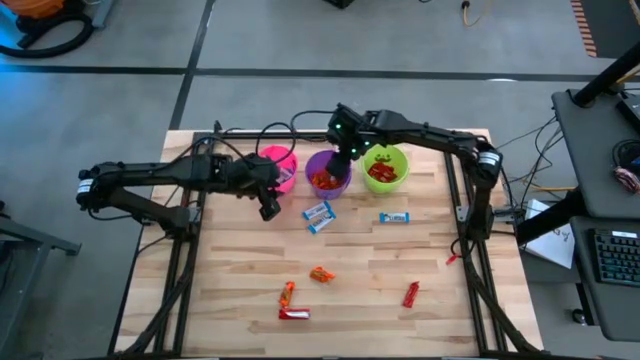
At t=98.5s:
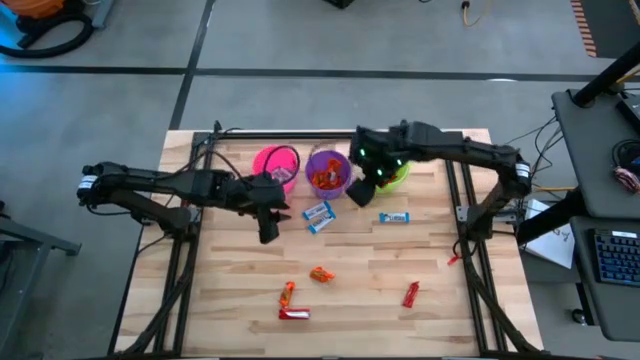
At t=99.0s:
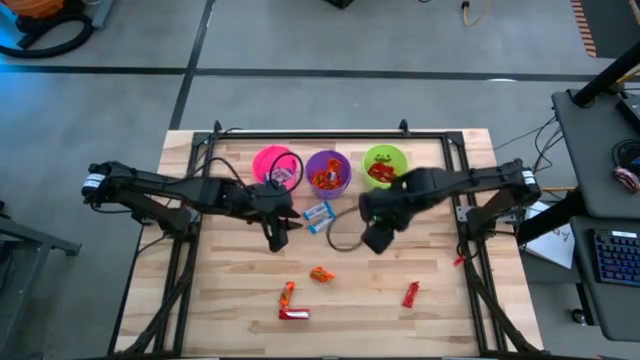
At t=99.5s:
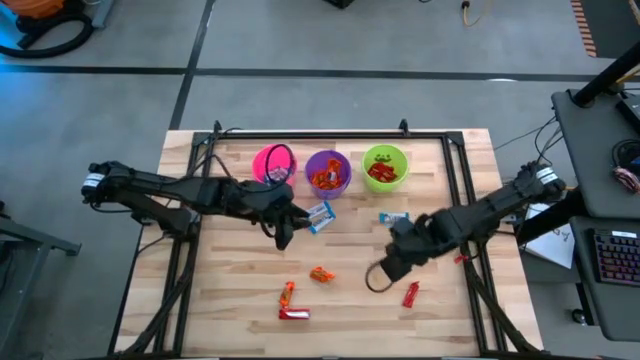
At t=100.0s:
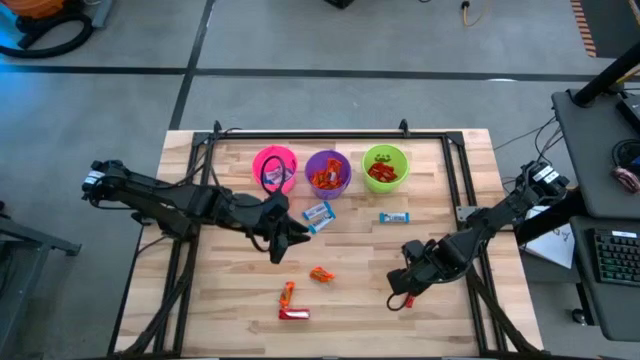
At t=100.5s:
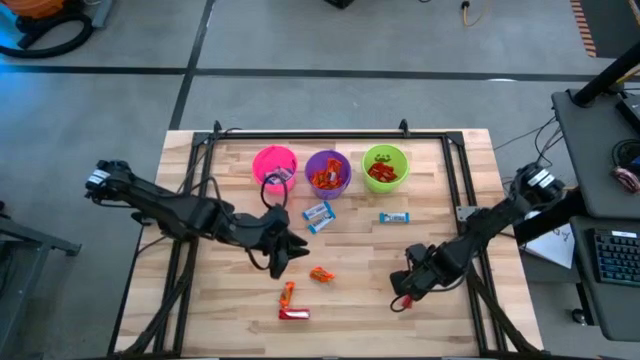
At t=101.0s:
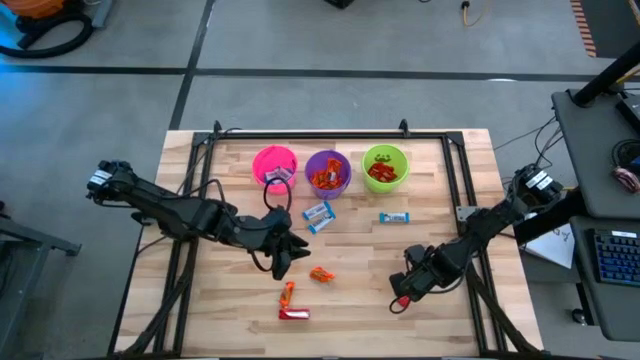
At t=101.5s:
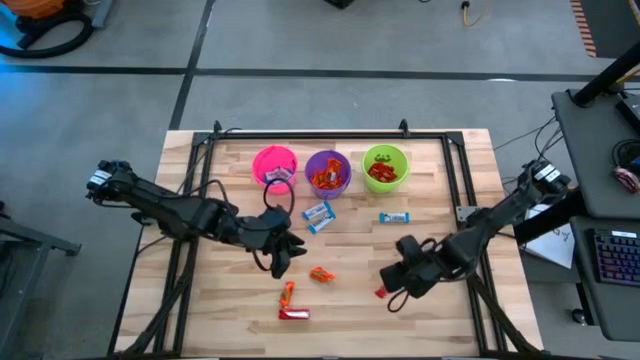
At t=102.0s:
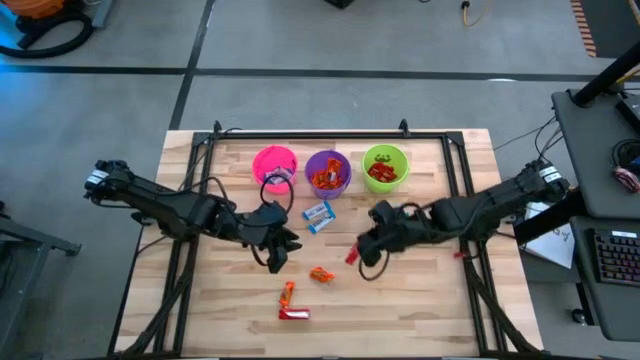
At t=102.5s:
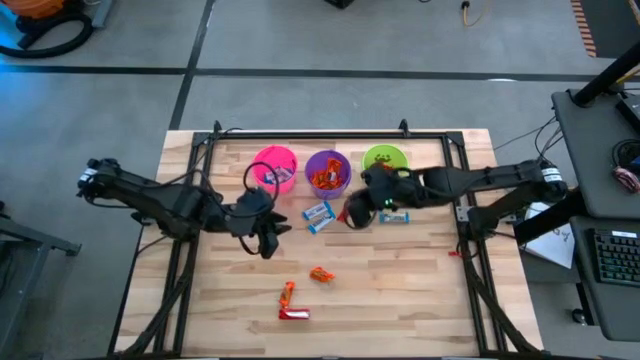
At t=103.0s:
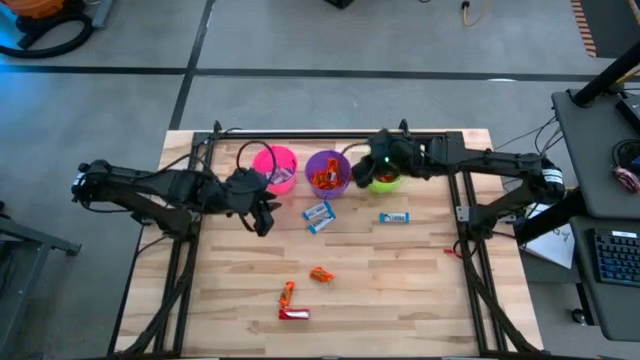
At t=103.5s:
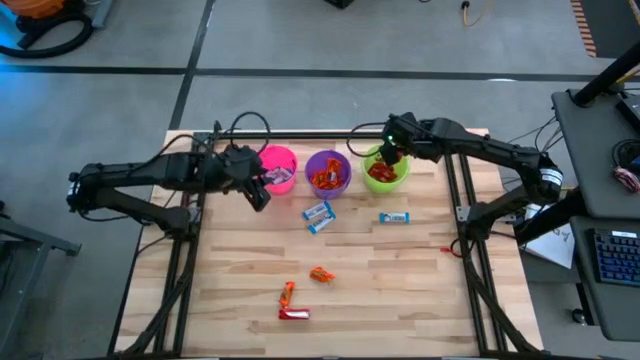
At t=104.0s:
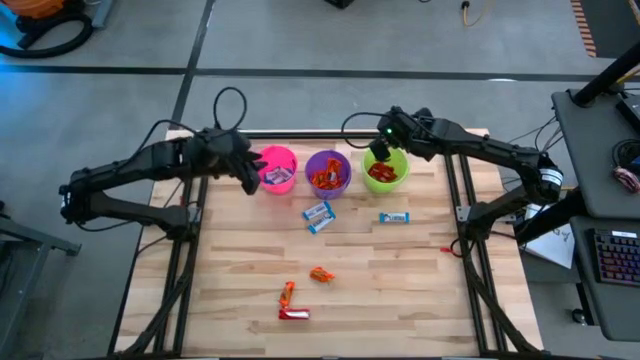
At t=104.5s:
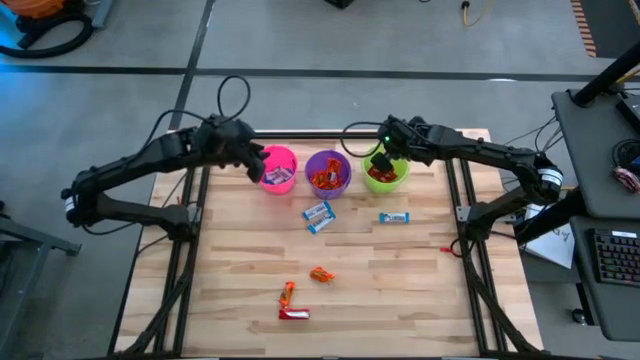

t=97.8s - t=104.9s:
Task: Organize candy in baskets
Put the red chocolate into the green bucket

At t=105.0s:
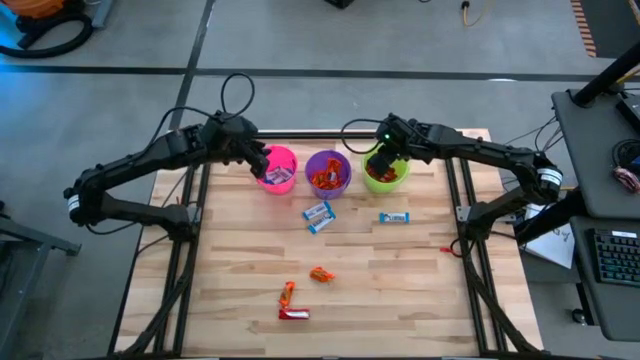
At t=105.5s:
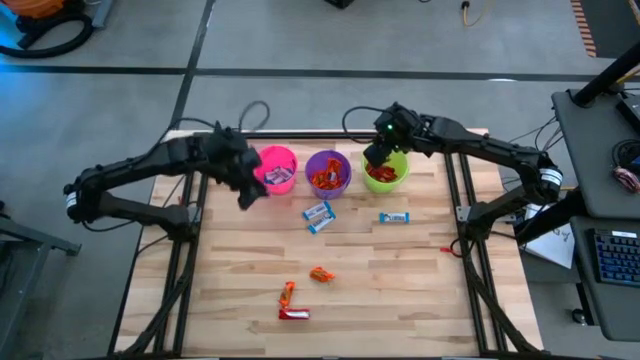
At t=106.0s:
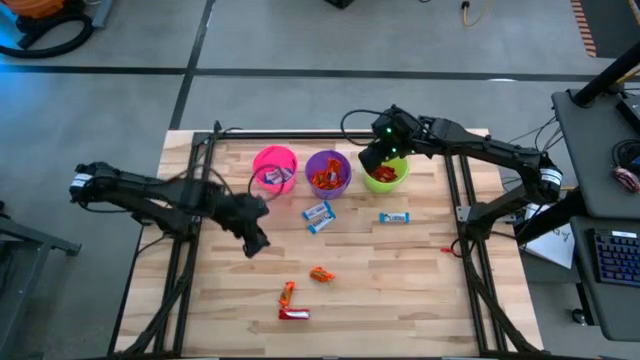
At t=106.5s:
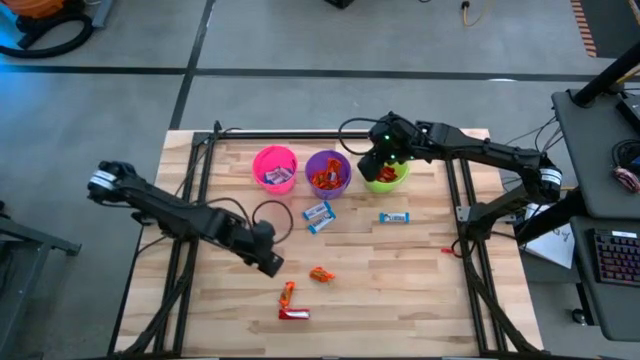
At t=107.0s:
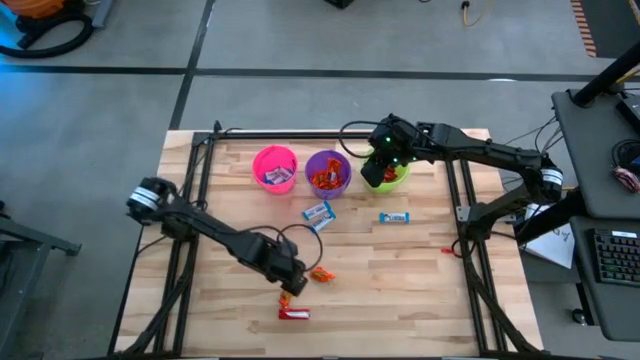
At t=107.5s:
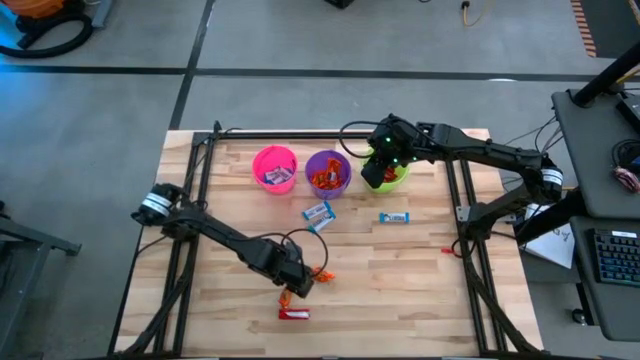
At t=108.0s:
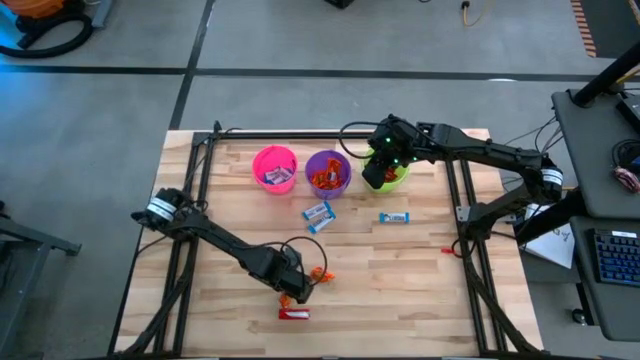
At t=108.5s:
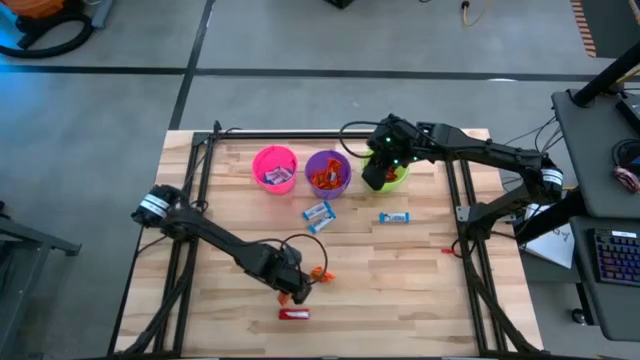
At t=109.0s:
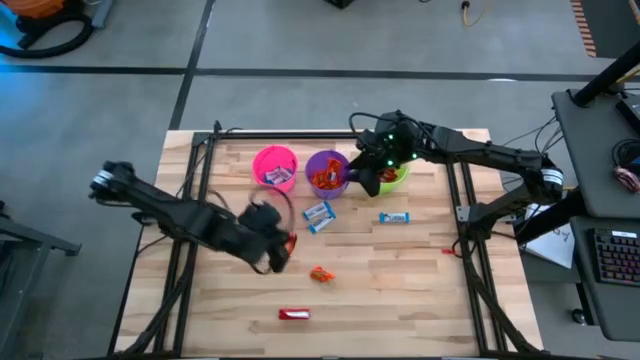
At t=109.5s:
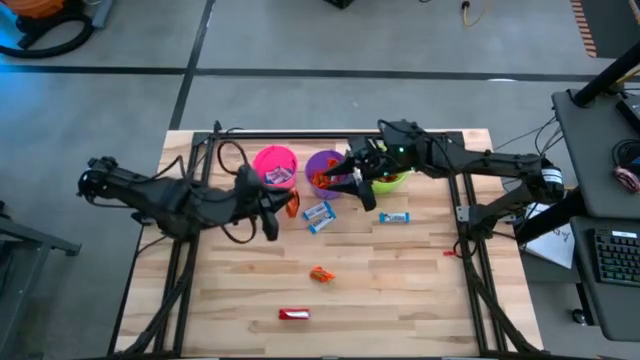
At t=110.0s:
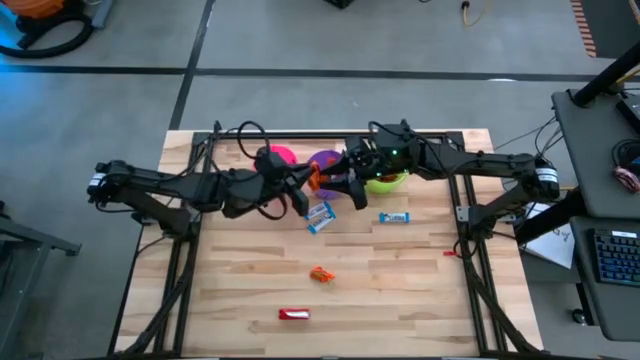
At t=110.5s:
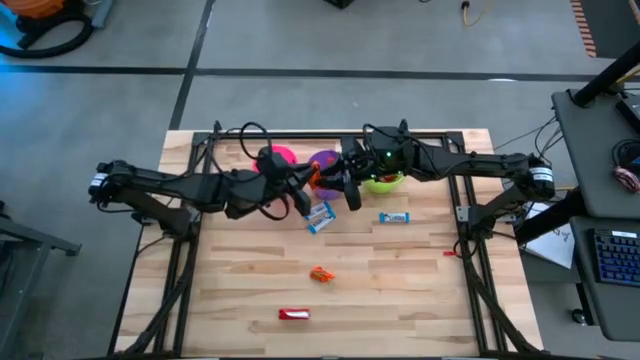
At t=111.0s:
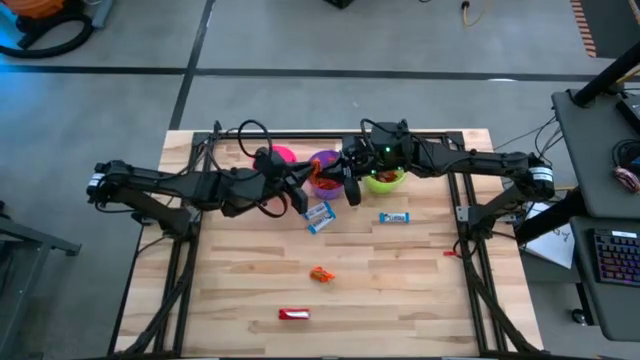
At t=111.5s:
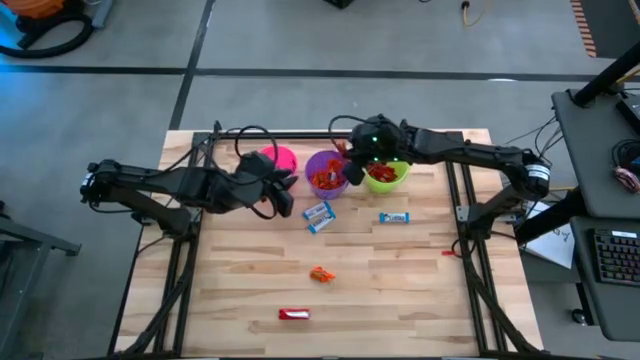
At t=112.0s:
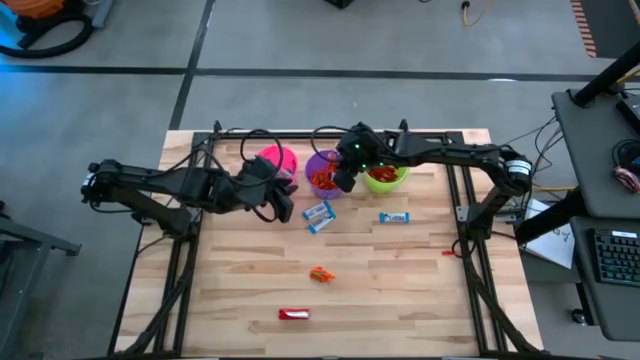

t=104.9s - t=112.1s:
Put the orange chocolate into the violet bucket

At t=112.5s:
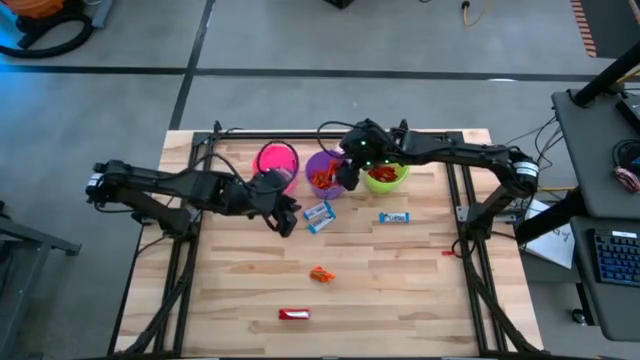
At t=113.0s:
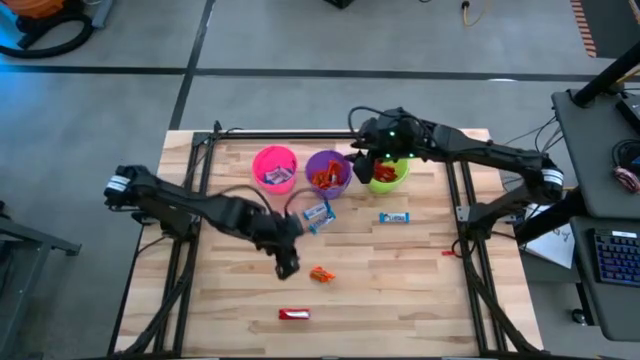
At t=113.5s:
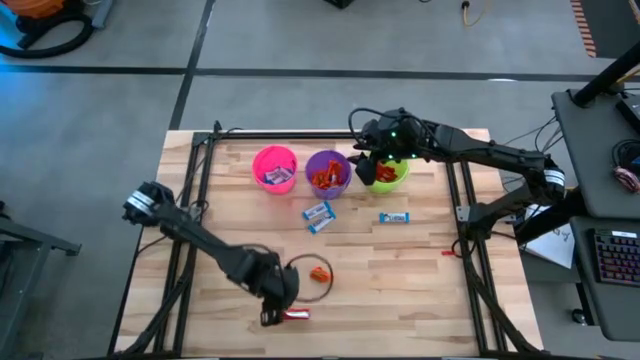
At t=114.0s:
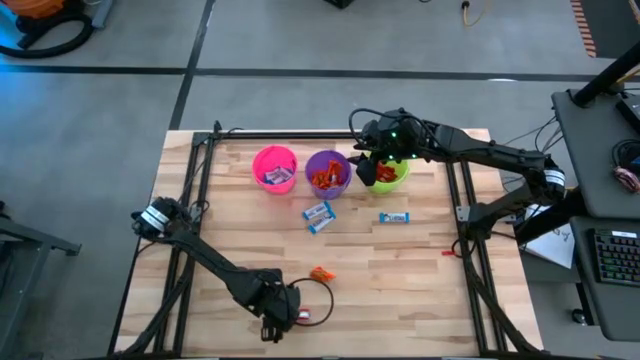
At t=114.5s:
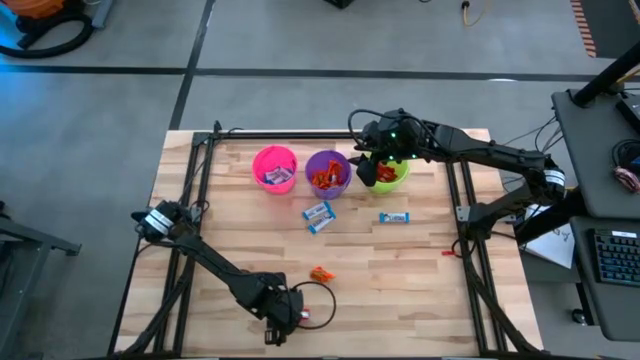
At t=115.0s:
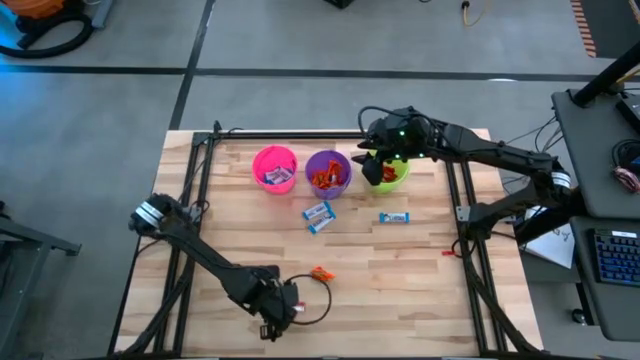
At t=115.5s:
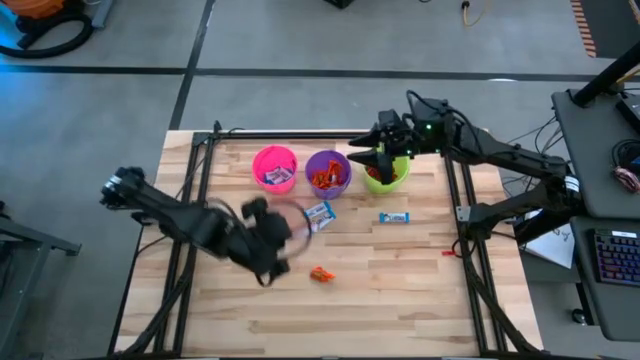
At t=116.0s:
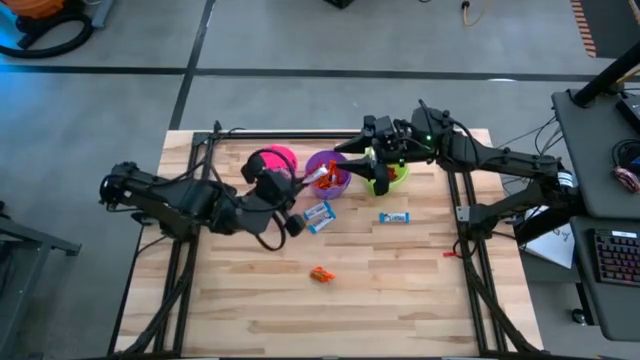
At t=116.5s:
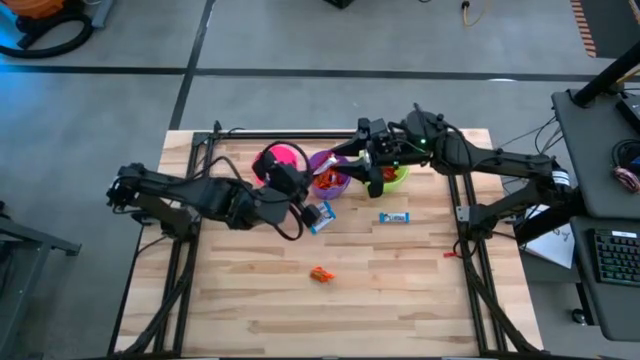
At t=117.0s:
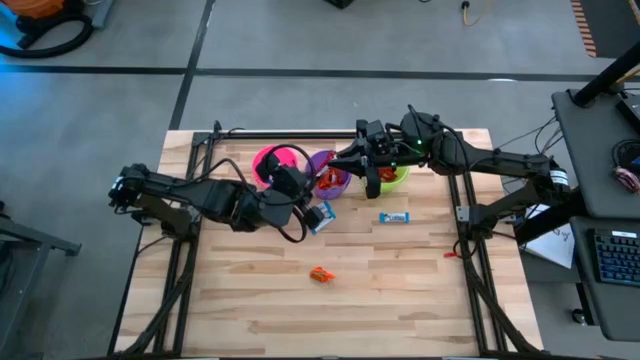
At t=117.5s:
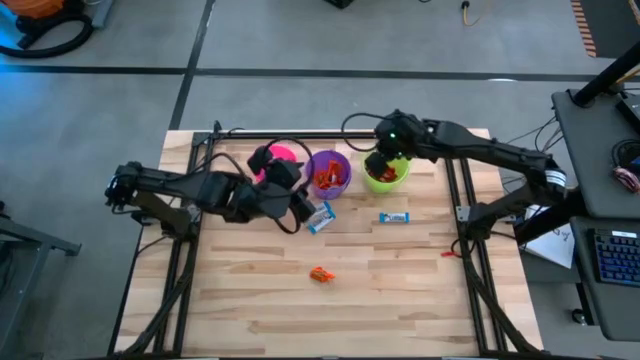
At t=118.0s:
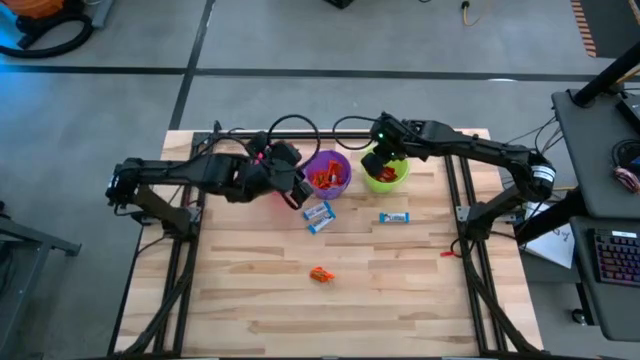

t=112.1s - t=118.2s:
Put the red chocolate into the green bucket

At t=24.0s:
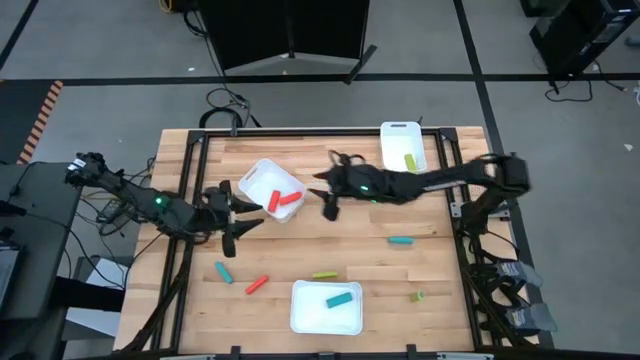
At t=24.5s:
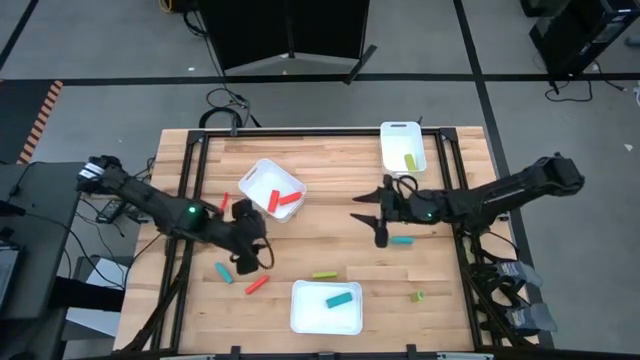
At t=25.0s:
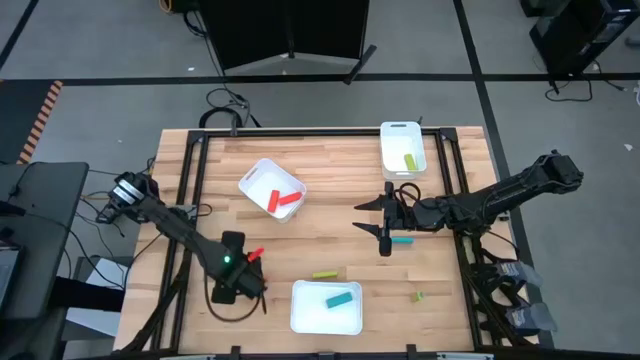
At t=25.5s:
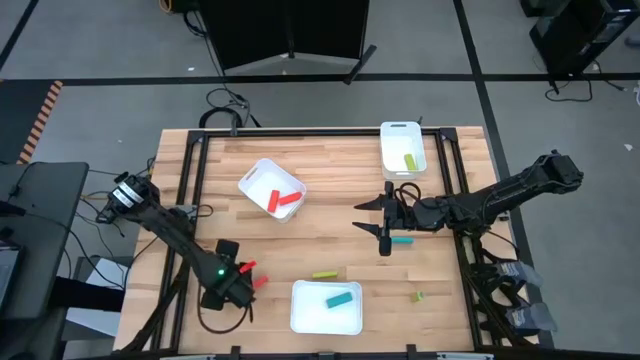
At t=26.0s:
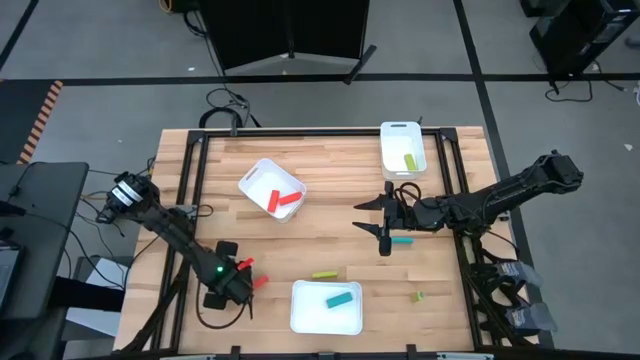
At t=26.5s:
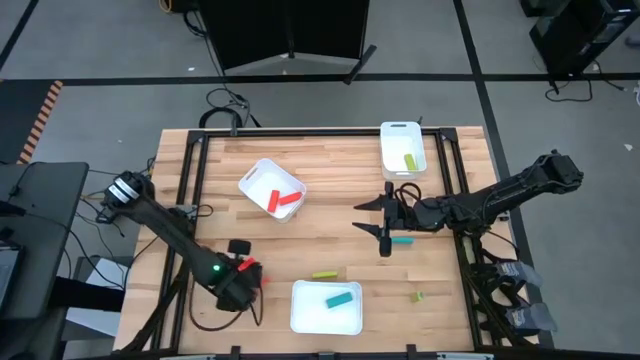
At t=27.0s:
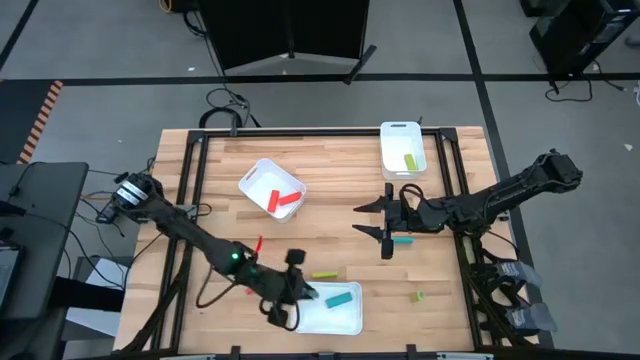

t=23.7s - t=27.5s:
Task: Sort blocks
Put the left blue block into the bottom bin
